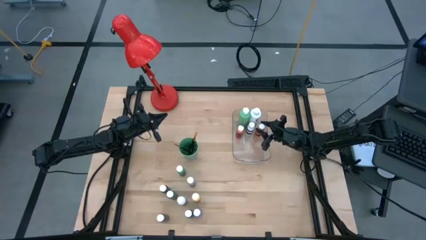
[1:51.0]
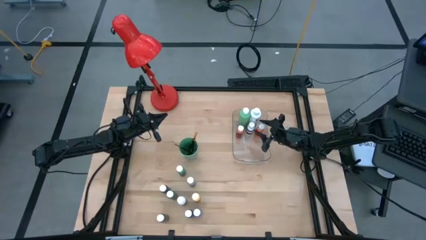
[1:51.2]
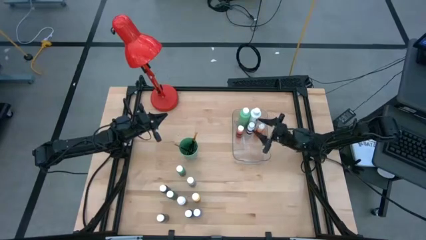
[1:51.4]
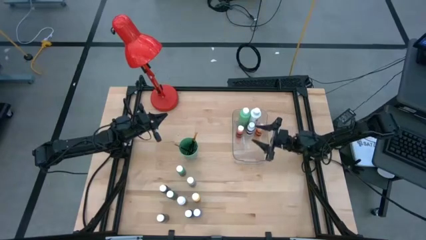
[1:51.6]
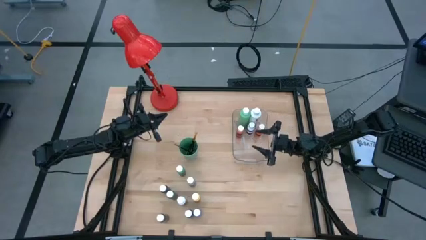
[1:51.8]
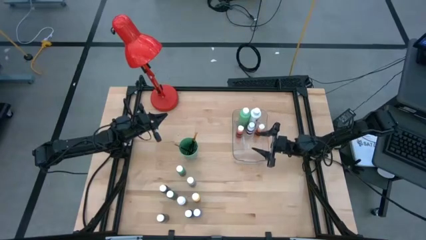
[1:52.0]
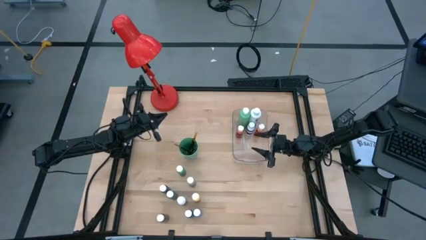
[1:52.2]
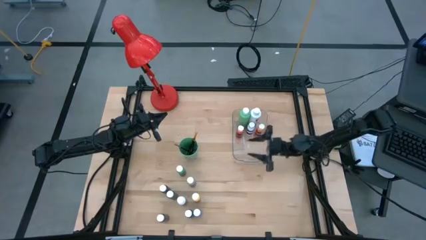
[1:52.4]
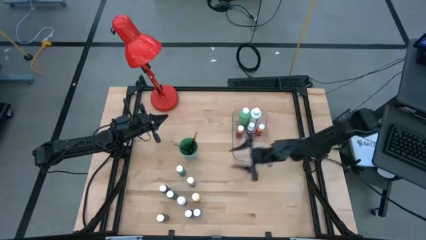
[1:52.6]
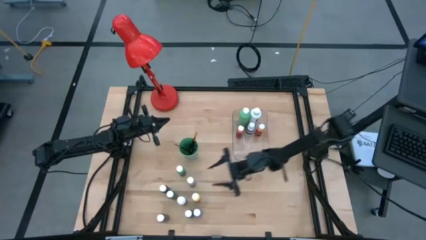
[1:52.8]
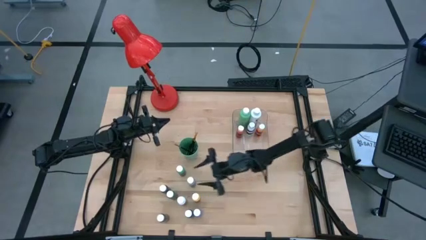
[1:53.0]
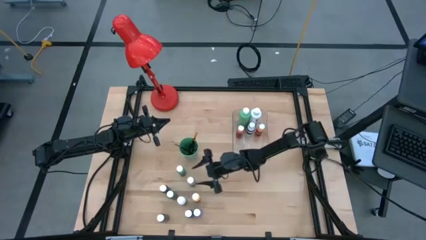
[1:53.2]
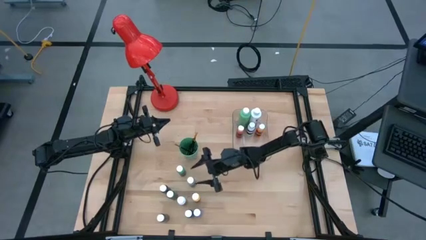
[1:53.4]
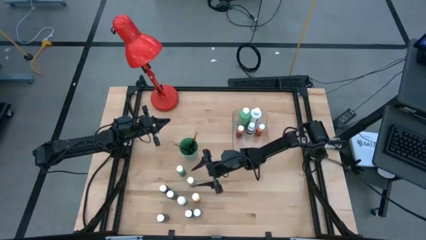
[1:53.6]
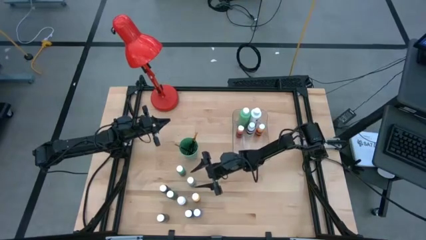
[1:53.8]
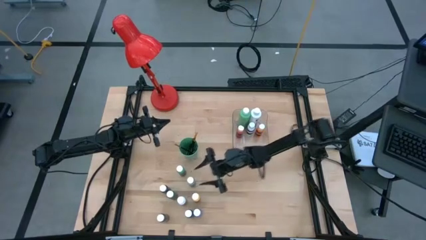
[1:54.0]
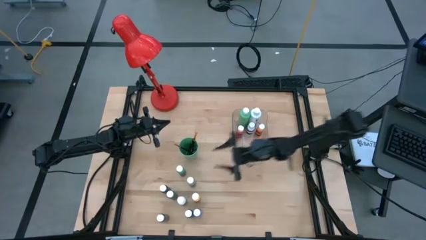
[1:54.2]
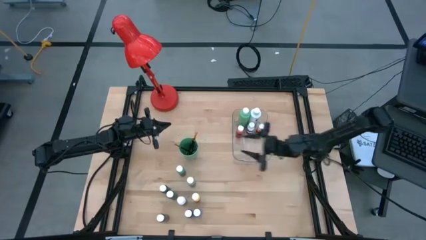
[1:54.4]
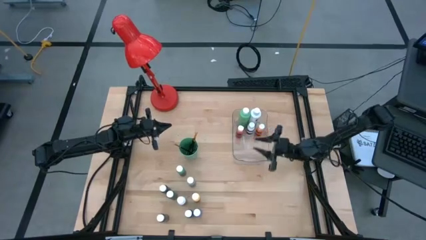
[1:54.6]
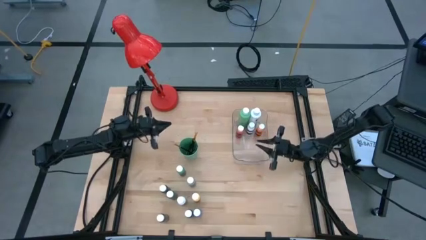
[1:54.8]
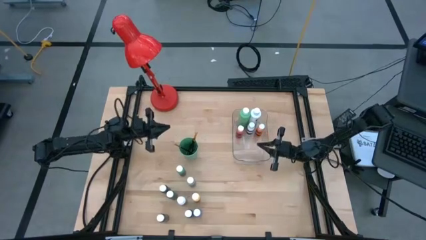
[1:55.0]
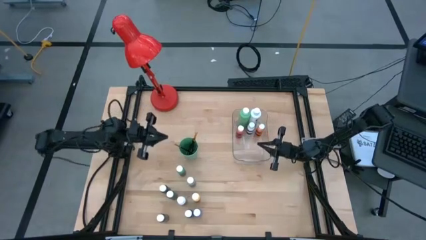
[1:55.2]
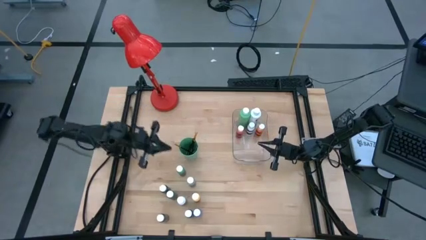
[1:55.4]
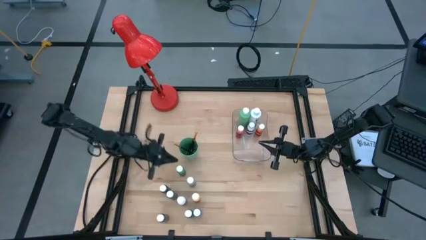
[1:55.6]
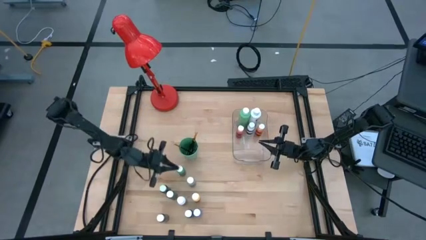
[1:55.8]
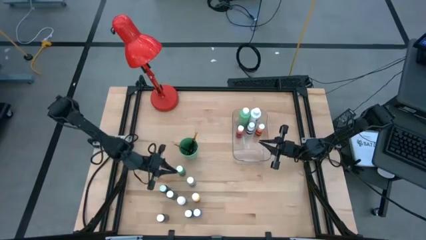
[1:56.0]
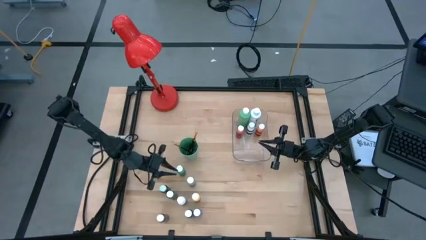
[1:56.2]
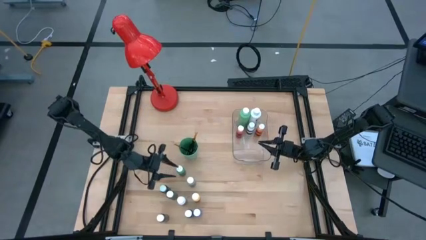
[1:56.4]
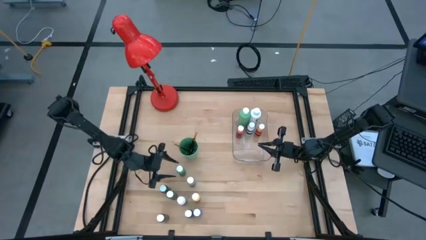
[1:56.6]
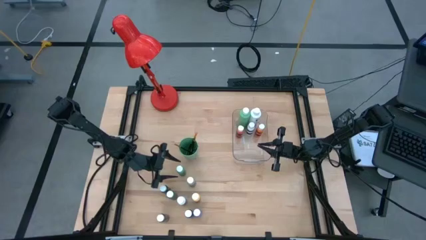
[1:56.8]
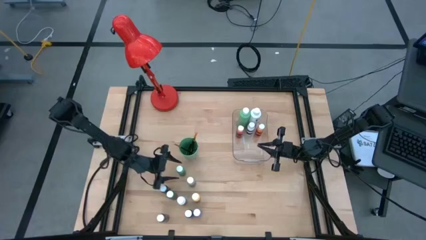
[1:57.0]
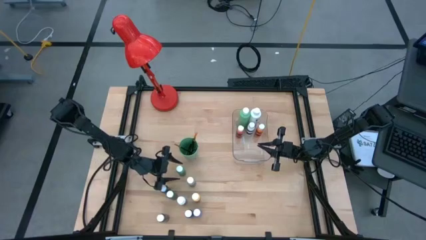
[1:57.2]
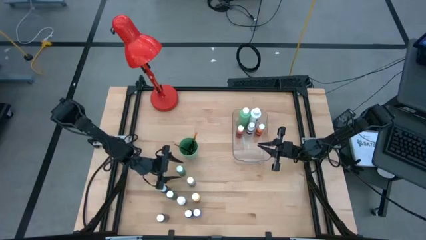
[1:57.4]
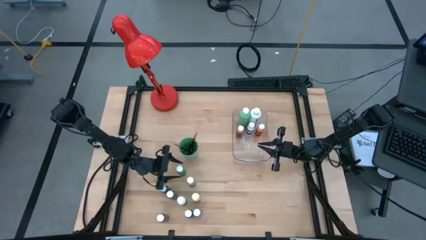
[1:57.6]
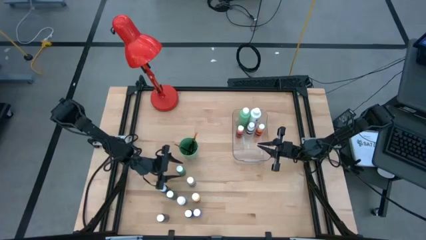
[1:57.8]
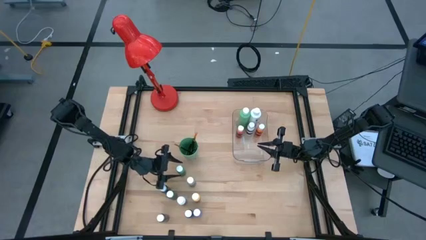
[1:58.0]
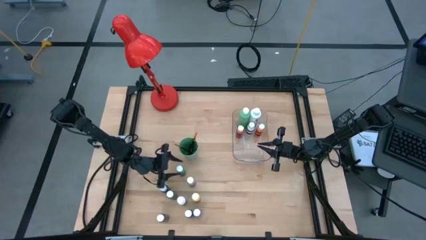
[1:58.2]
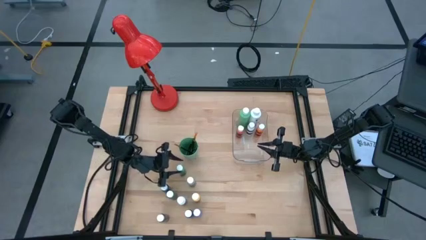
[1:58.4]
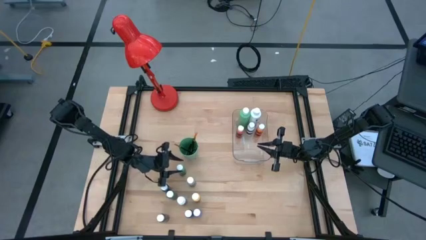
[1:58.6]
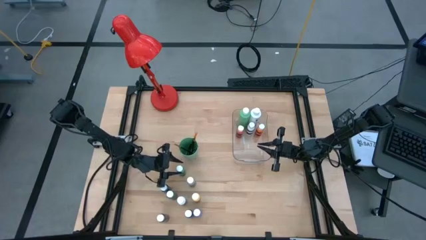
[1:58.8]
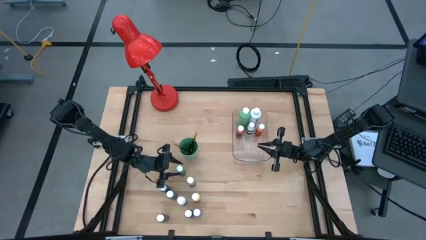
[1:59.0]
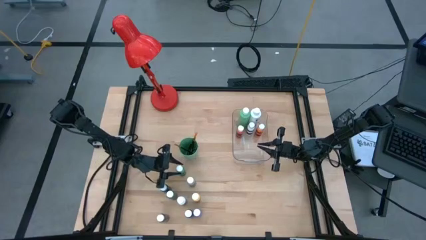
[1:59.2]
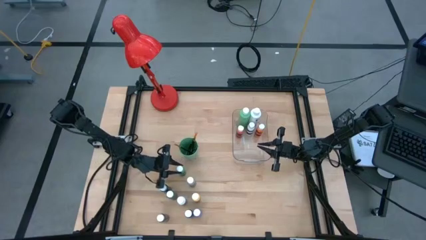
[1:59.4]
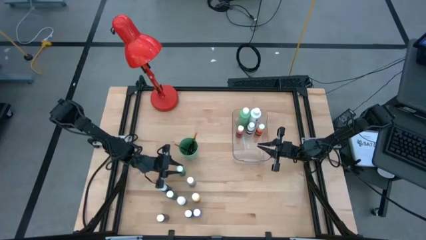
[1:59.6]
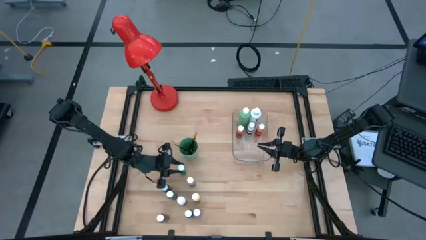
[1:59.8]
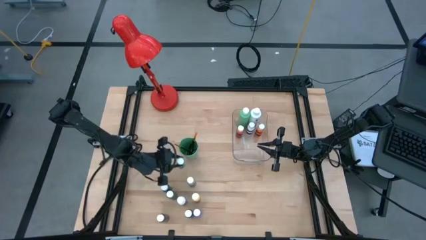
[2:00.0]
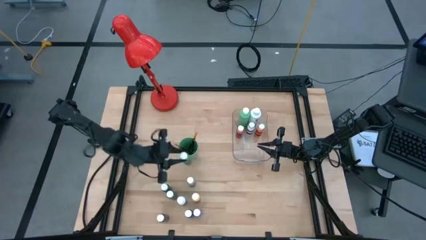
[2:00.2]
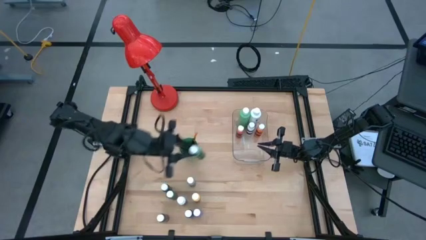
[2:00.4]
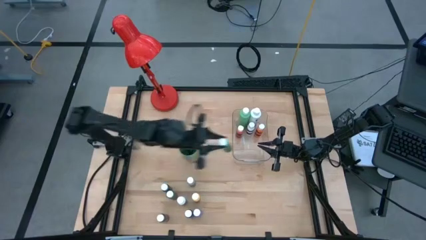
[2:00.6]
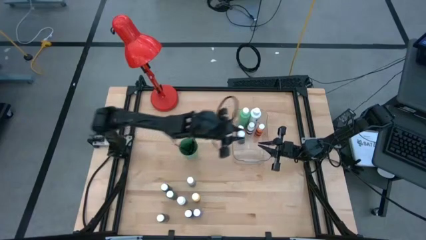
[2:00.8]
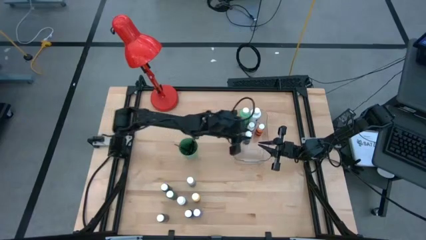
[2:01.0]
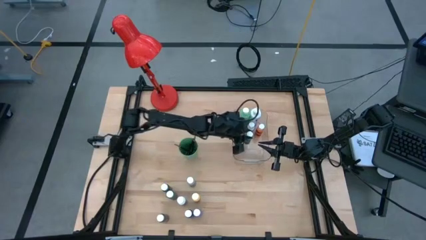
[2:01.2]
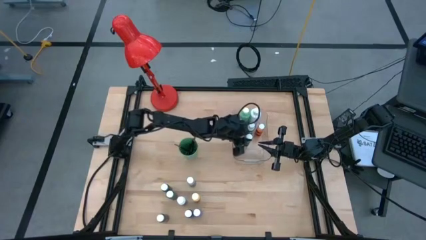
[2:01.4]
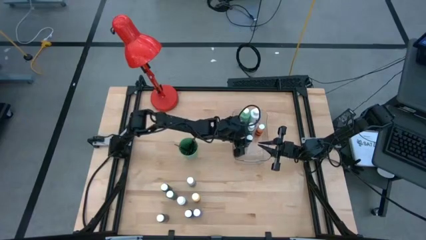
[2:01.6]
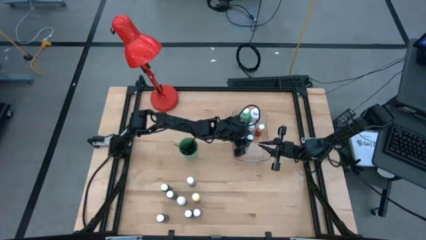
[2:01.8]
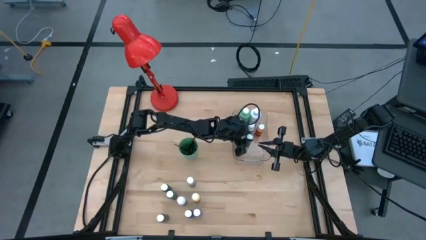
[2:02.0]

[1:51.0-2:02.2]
Task: Pick & Place Paint Supplies
Put the small green paint bottle into the transparent bin

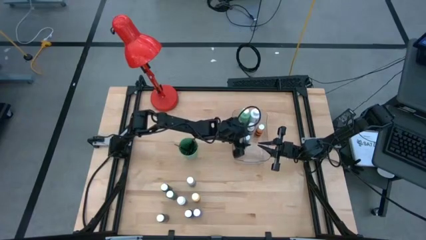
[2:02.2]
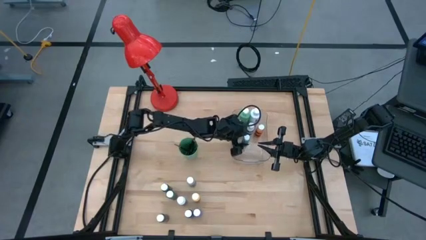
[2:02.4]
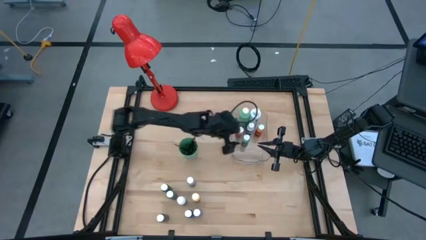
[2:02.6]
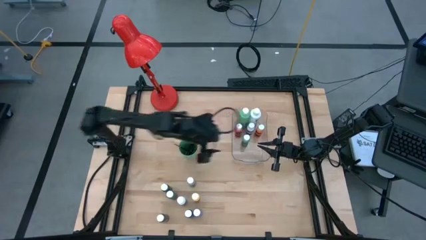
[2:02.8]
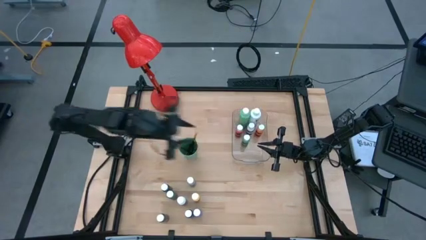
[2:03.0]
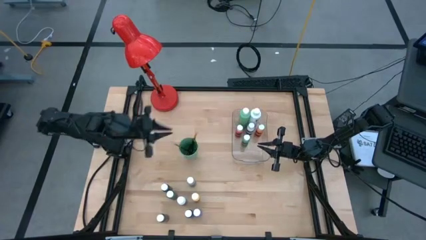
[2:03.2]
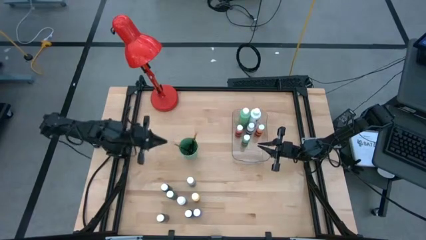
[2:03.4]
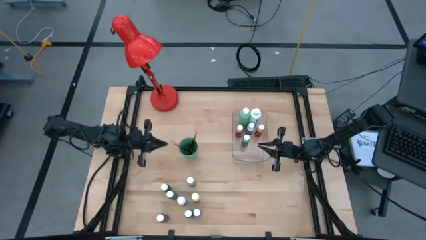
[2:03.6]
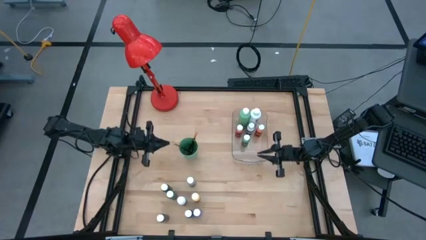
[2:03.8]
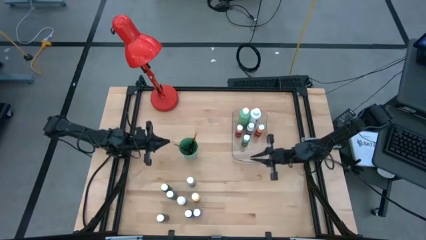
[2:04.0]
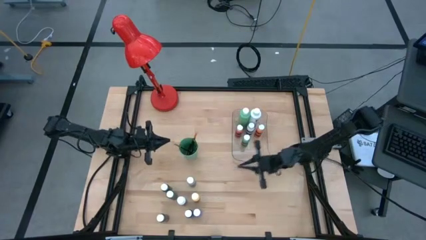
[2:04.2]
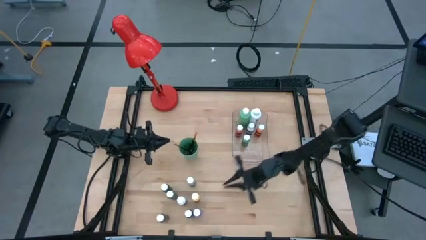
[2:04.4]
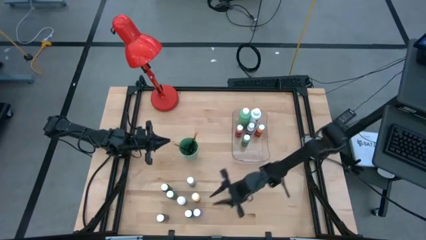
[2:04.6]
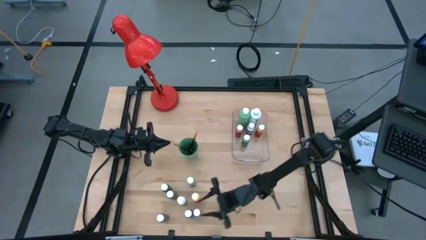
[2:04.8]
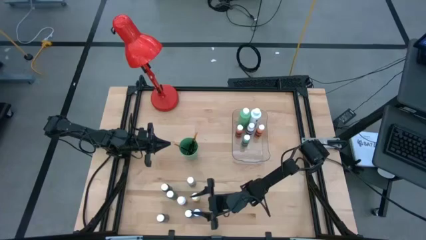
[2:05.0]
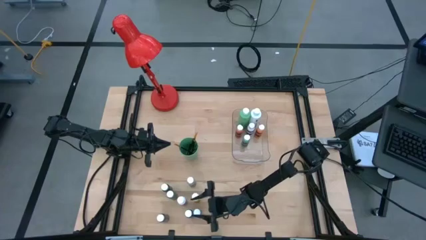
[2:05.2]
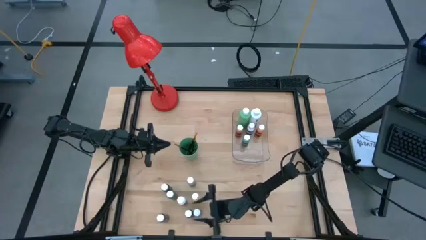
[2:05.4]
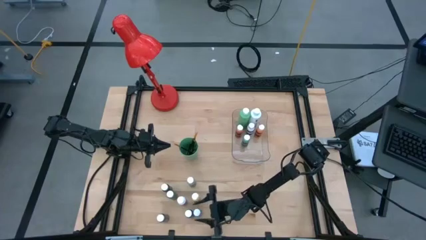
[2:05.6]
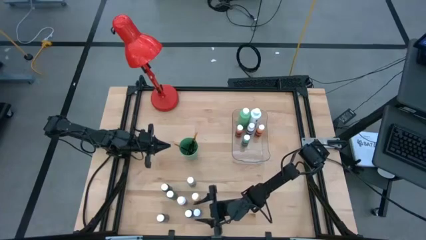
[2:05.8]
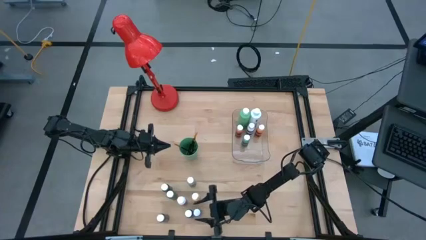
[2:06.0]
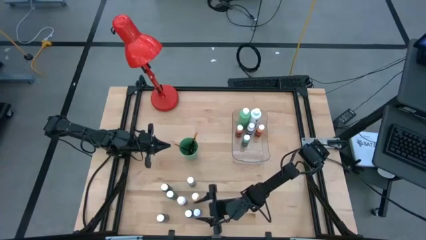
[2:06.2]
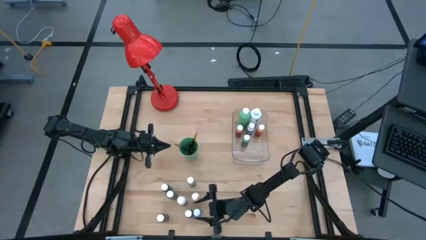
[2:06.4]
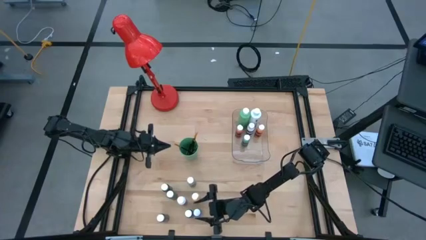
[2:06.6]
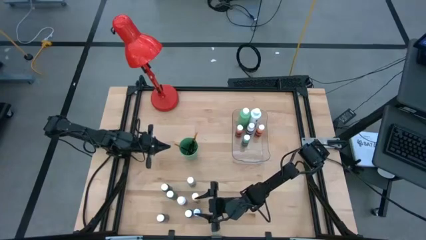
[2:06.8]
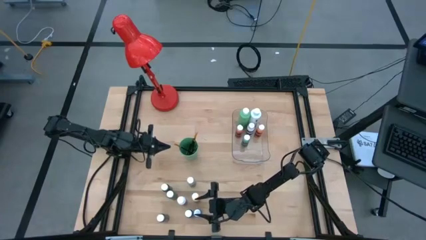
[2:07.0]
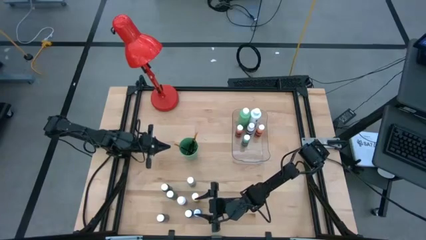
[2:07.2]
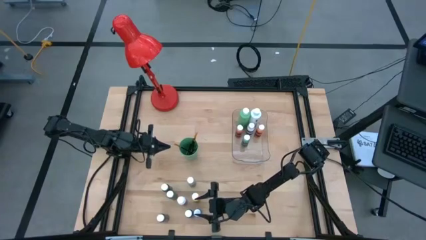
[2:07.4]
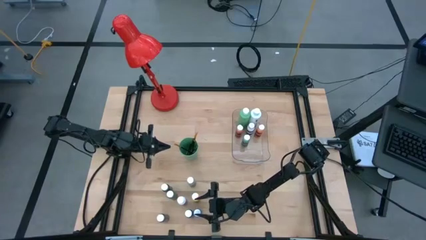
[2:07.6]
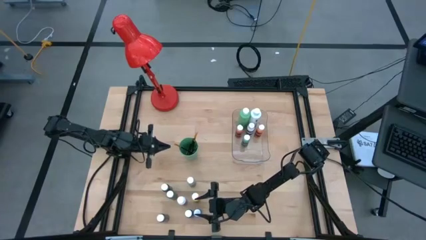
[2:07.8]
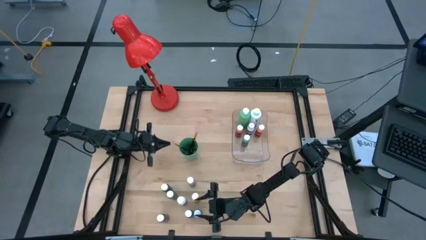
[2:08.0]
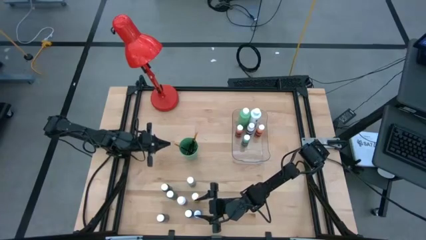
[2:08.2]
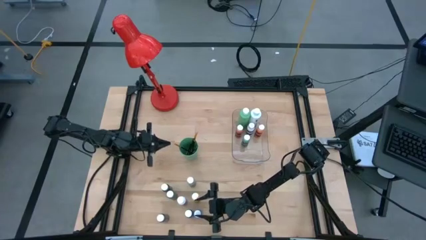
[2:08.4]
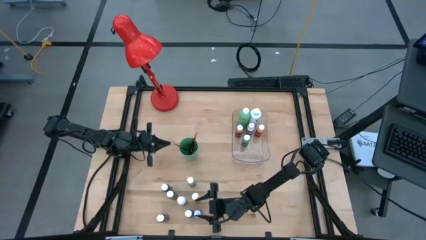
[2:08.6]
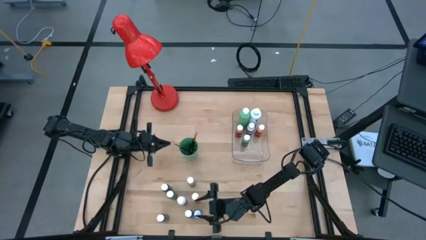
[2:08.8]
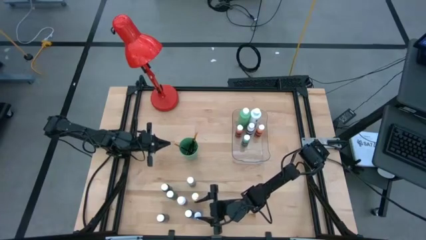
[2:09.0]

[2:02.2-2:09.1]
Put the small purple paint bottle into the transparent bin
